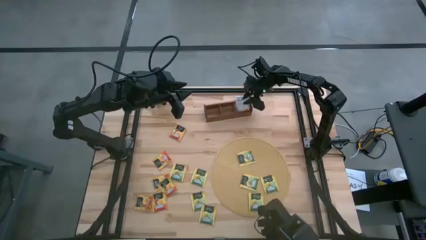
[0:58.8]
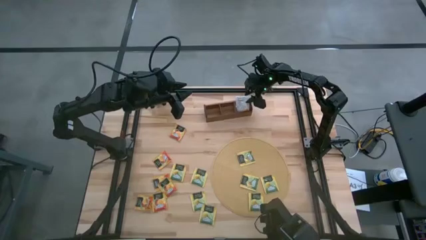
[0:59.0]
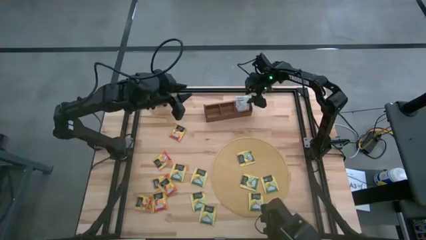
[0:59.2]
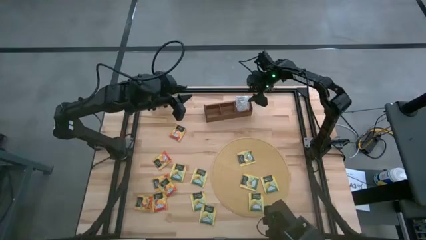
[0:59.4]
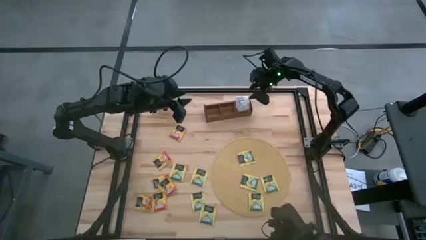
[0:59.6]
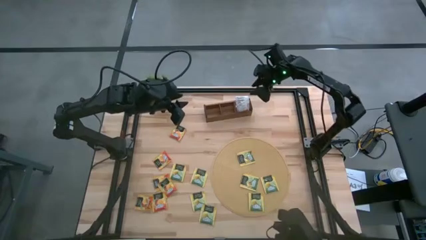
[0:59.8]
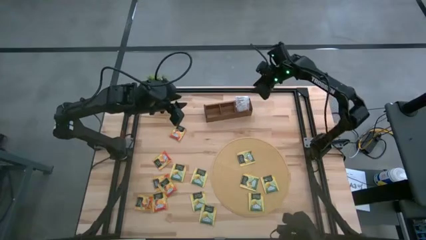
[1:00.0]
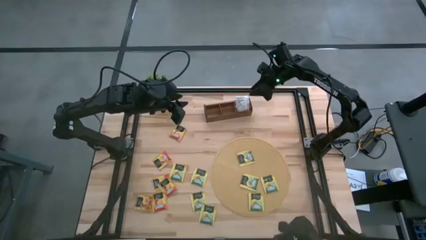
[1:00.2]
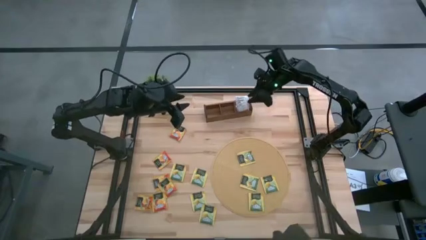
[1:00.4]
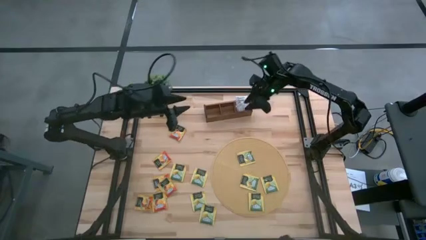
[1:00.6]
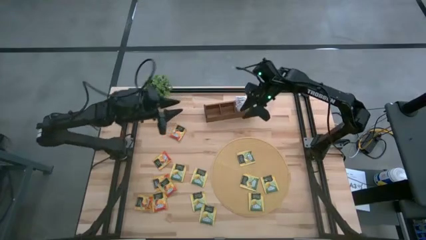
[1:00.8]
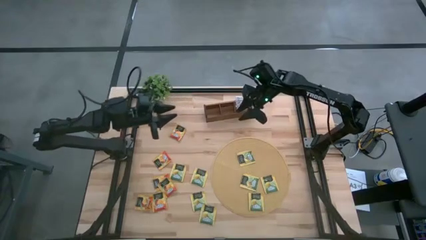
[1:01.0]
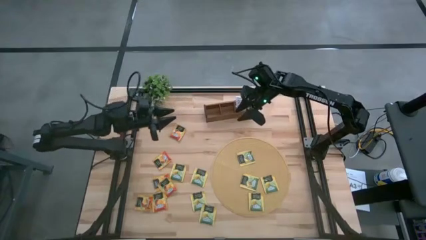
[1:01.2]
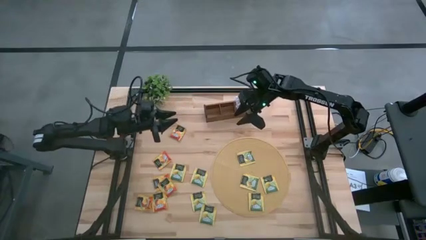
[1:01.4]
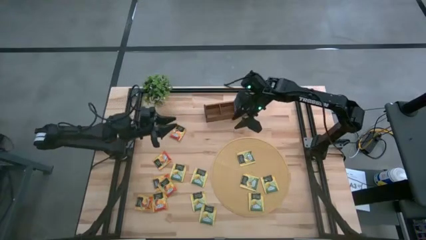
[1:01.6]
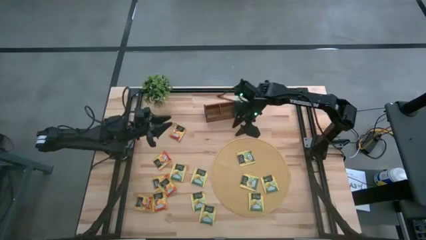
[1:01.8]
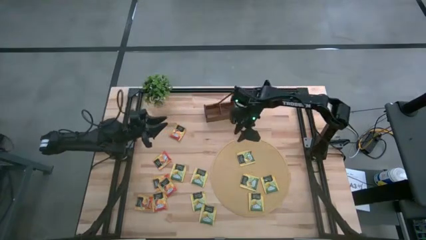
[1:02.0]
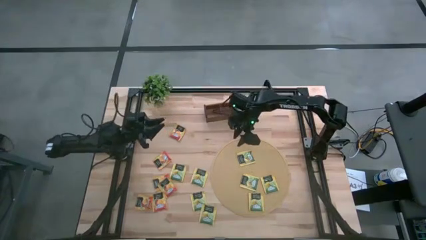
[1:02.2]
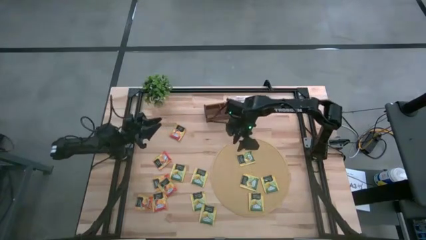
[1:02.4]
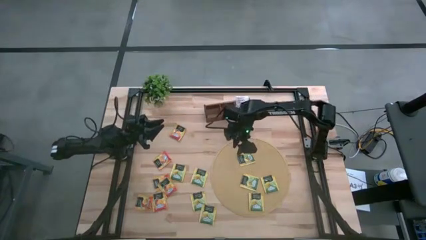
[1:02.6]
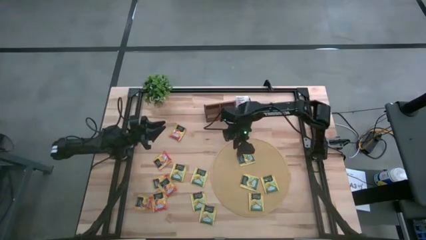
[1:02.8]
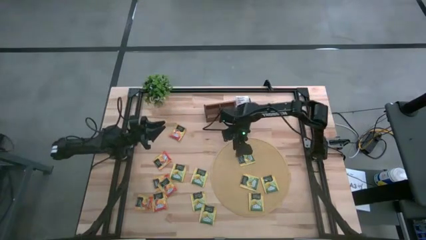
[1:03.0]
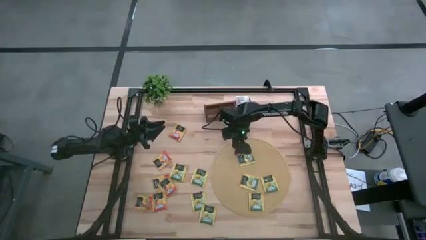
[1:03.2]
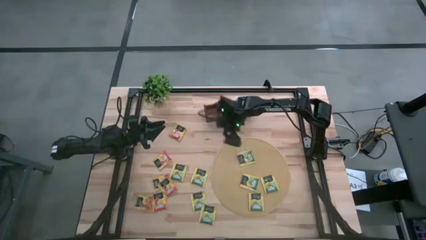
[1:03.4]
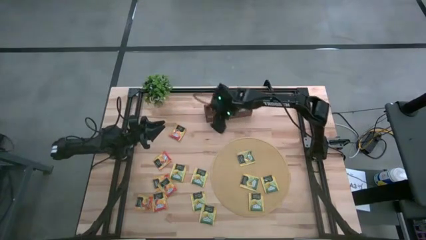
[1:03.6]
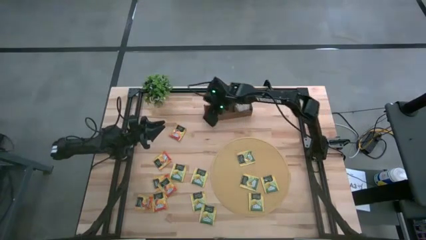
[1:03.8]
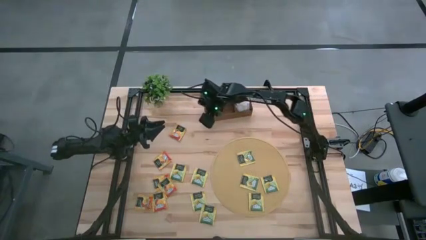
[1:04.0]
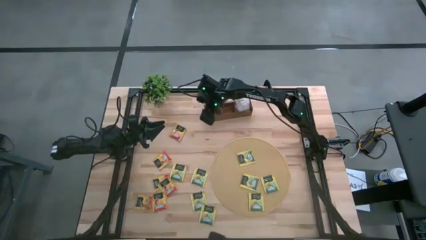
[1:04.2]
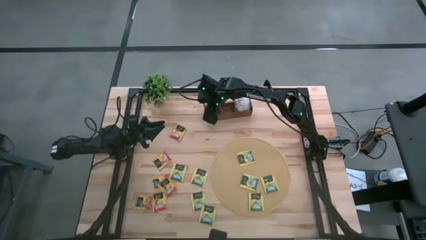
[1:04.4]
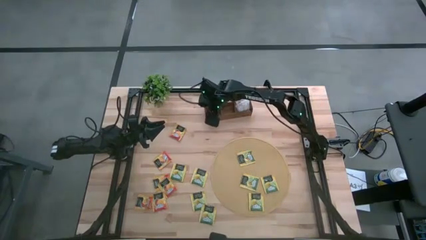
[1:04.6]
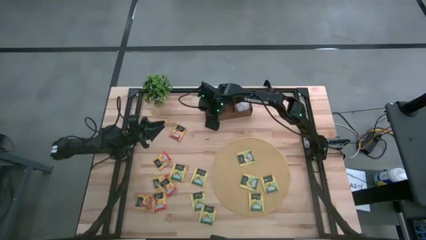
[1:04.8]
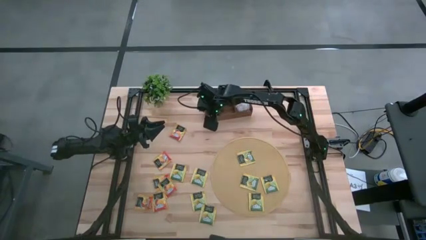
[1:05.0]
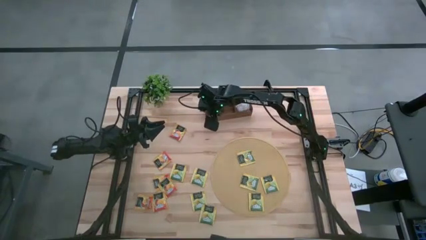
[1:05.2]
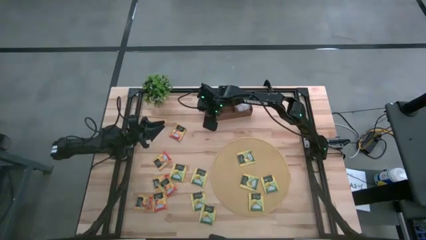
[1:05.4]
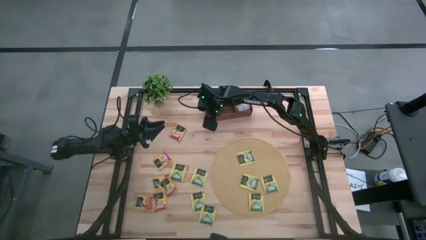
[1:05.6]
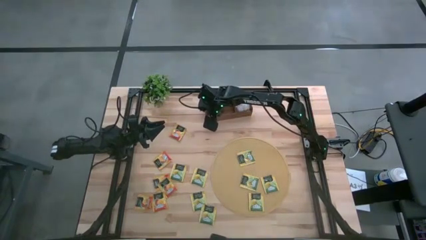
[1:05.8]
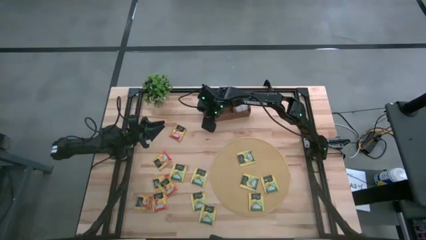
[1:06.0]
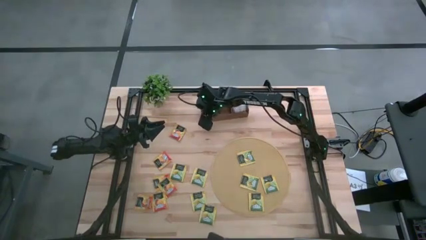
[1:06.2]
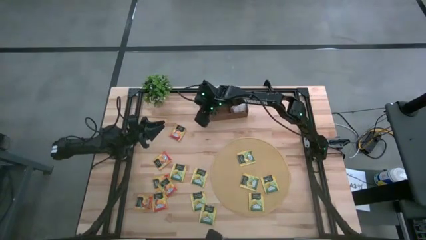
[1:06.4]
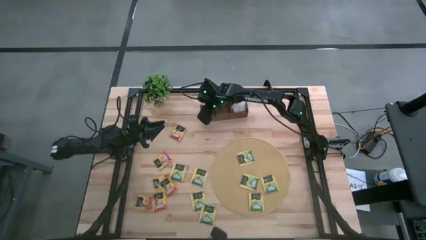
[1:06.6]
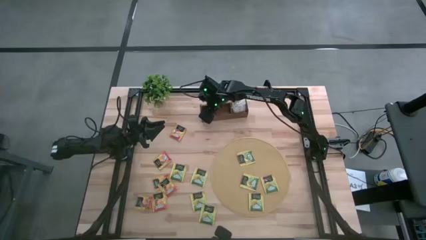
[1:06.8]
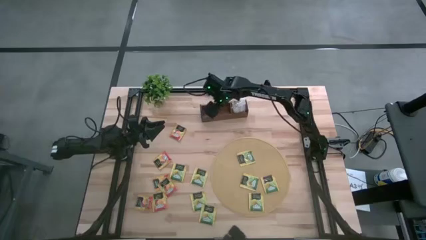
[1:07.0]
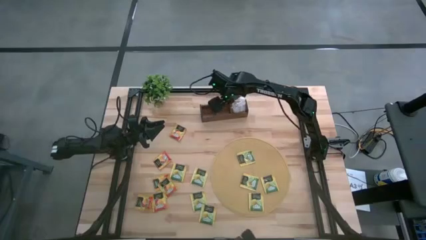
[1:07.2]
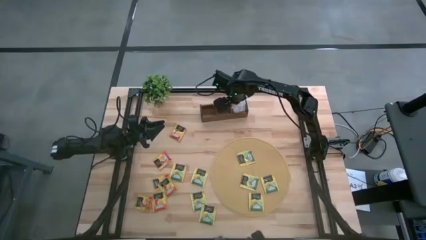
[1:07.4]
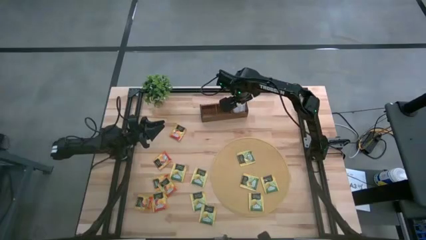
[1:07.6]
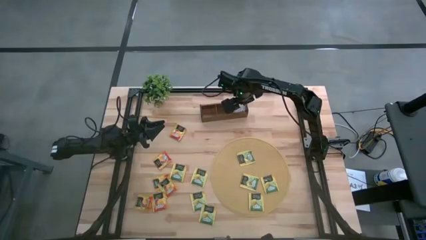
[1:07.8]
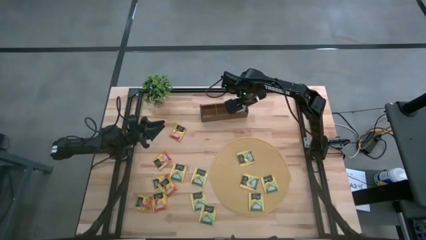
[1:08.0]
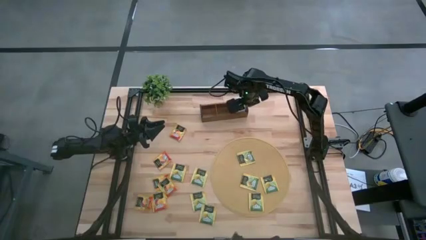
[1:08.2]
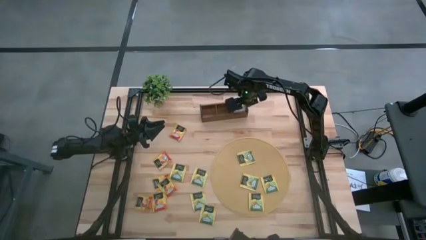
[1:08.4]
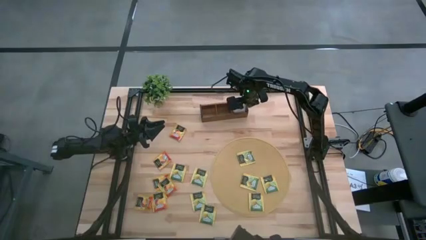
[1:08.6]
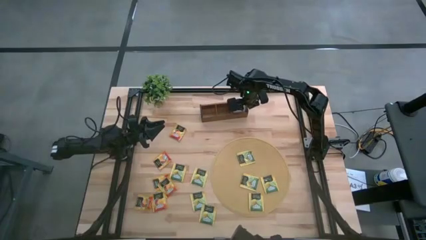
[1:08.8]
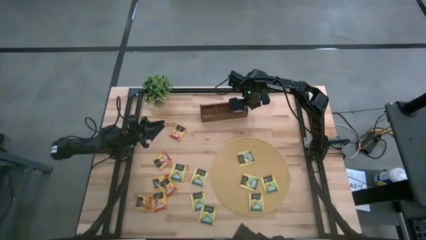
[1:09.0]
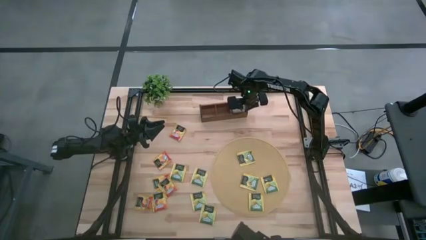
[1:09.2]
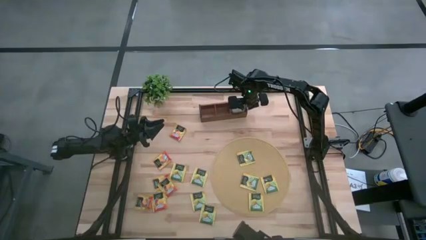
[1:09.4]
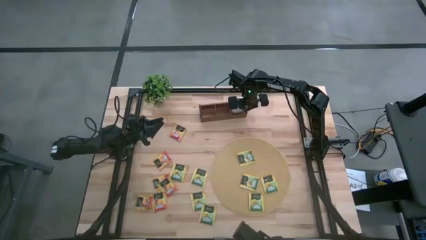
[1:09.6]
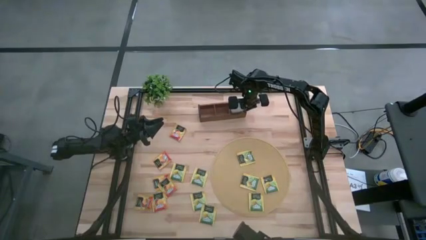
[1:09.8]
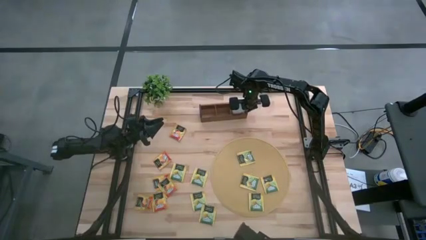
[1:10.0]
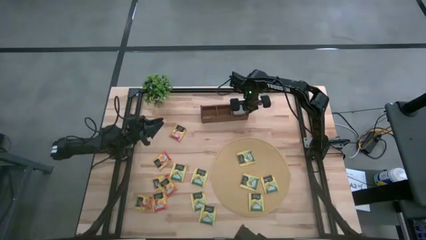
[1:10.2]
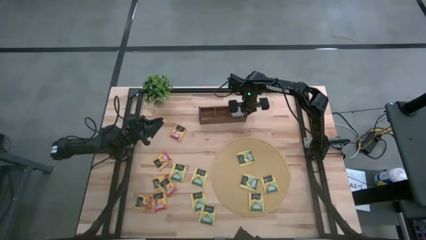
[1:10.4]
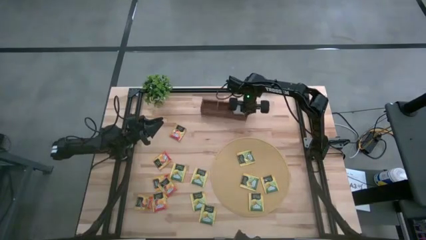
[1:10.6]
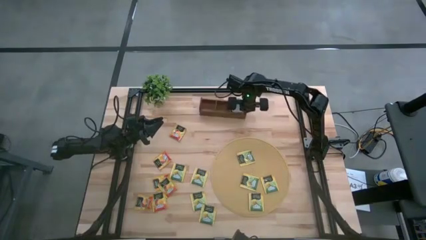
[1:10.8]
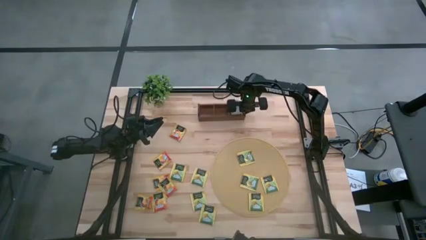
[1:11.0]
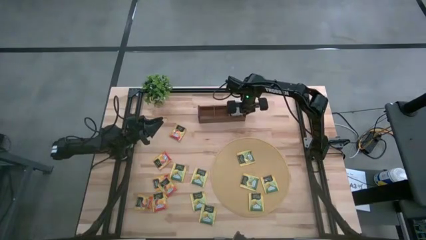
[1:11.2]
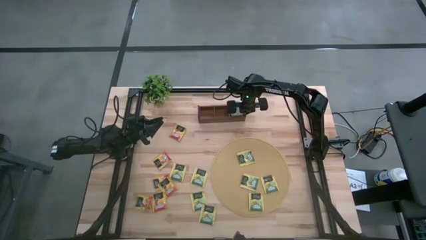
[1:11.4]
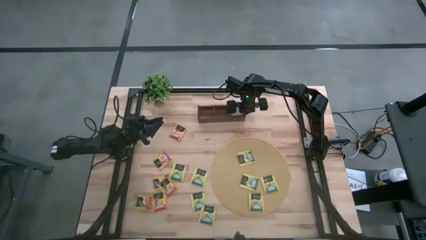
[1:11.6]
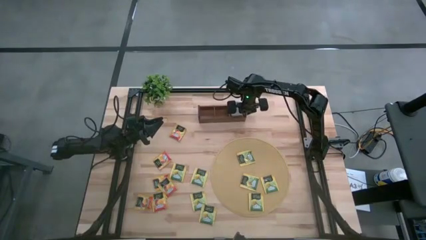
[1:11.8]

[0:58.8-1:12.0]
Task: Pick & Place Tea
Adjust the wooden organizer

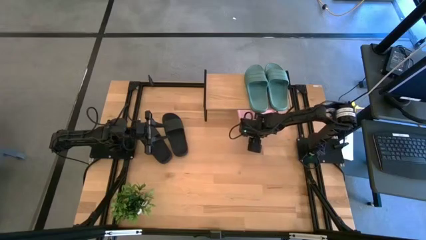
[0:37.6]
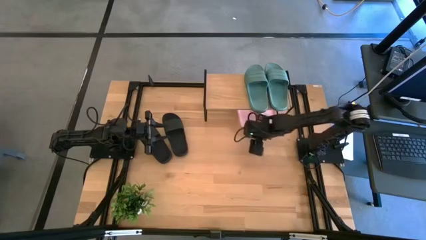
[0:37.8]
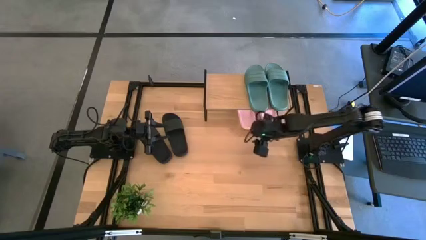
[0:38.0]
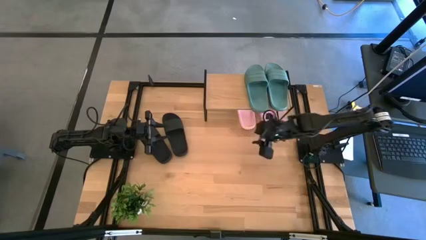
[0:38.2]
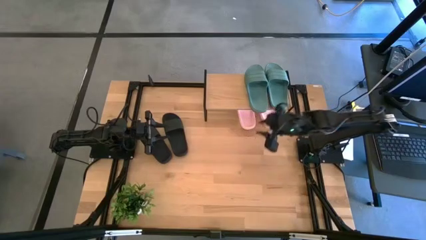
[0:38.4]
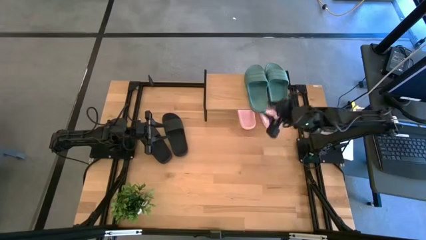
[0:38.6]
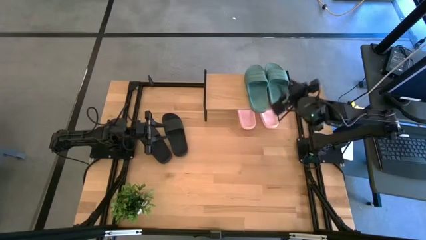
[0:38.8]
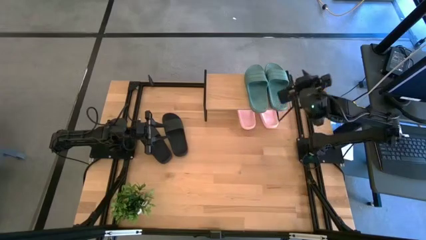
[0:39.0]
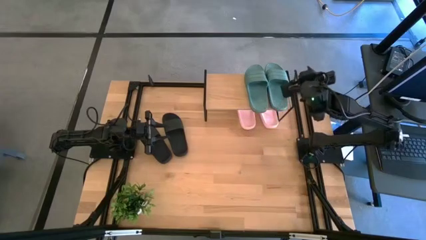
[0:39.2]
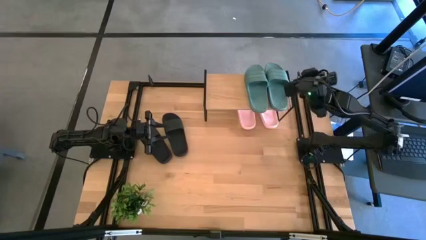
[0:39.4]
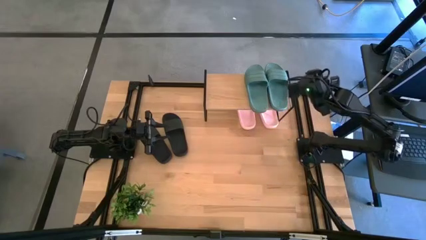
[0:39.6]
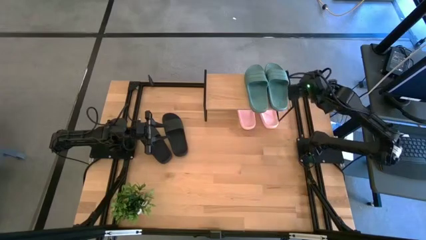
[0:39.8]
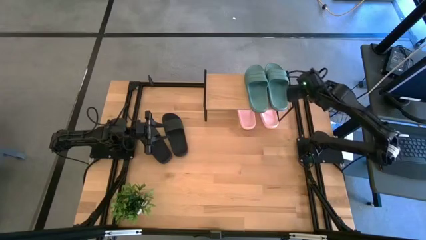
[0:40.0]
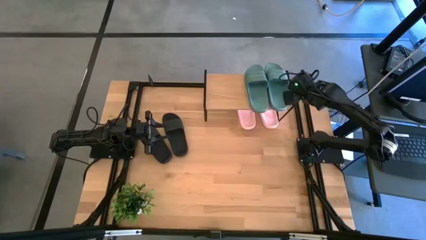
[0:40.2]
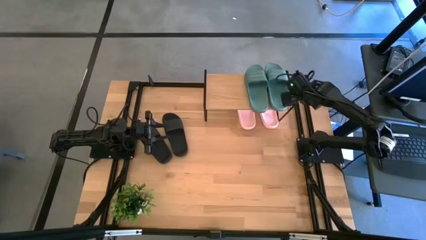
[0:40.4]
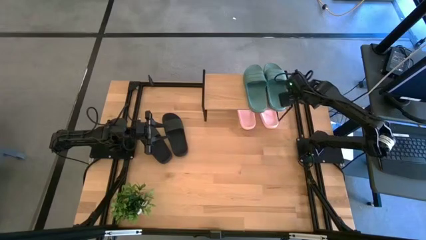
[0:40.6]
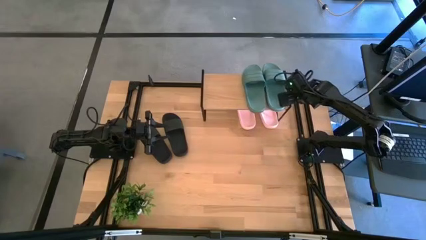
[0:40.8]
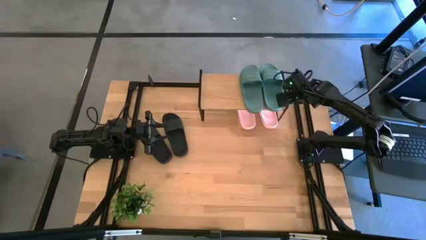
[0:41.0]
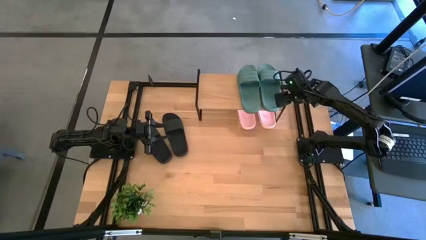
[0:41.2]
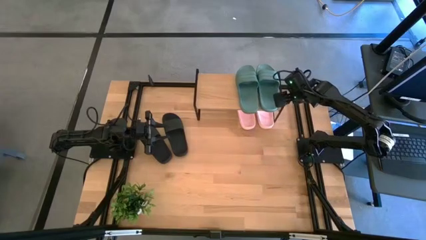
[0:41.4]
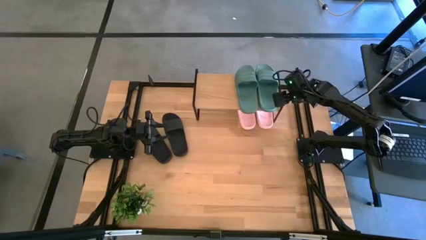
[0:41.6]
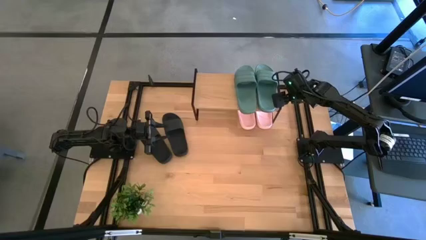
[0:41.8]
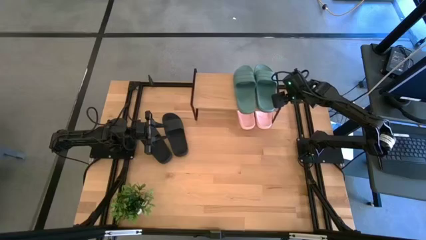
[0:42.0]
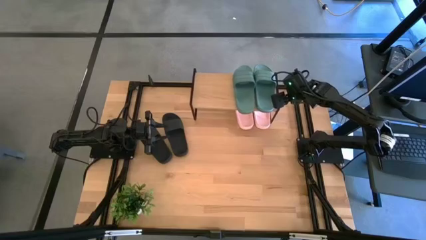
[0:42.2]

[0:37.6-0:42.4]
Task: Pick and place slides into the shelf
Adjust the shelf
